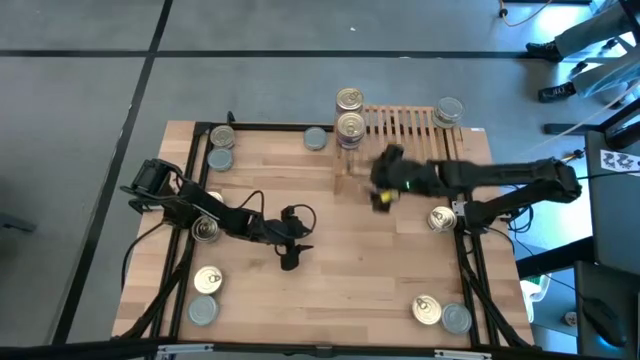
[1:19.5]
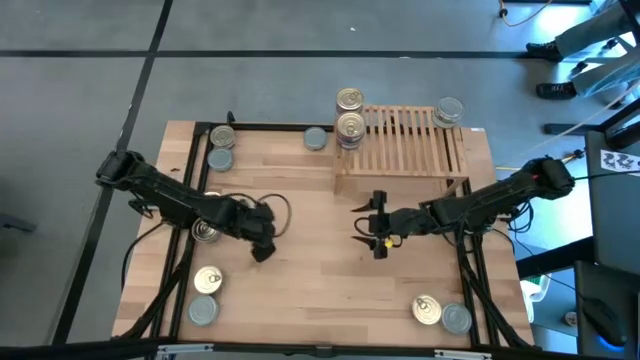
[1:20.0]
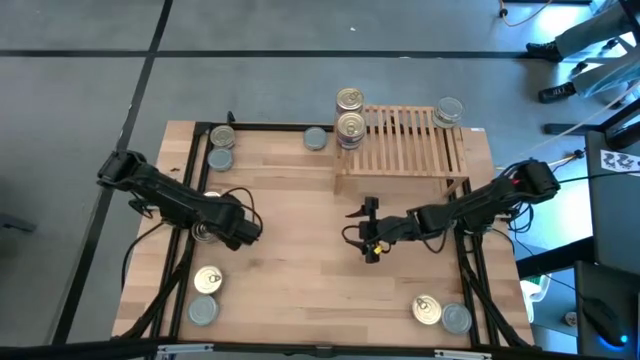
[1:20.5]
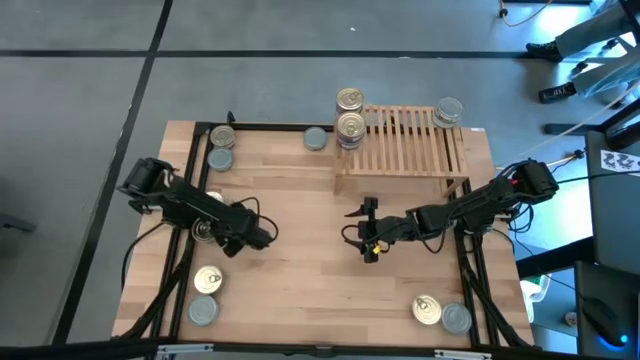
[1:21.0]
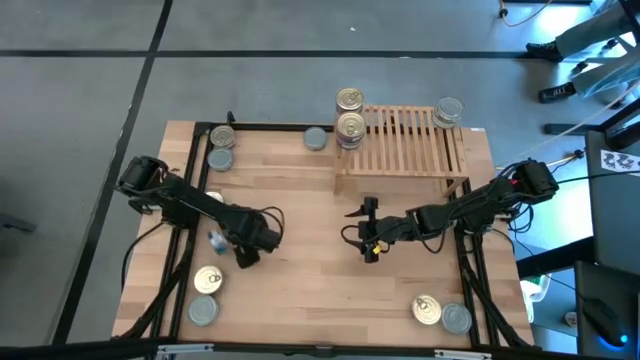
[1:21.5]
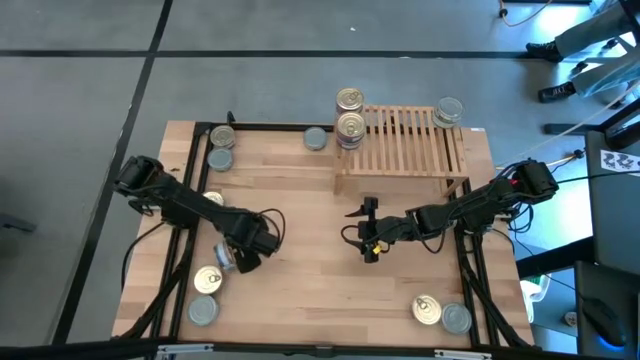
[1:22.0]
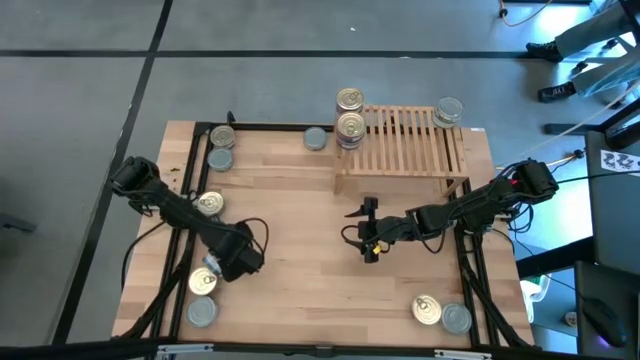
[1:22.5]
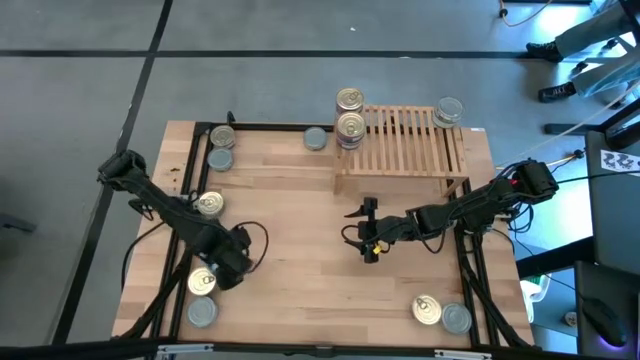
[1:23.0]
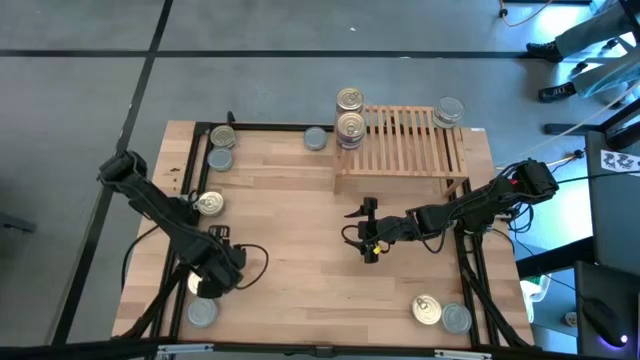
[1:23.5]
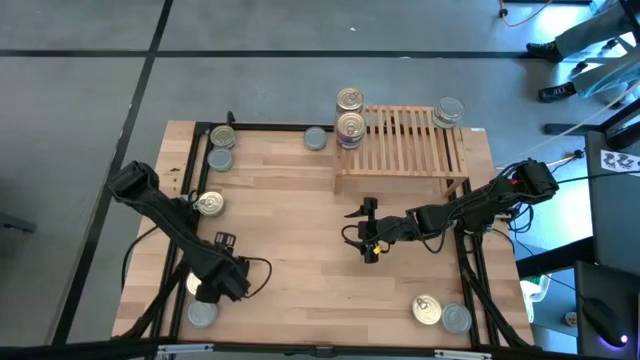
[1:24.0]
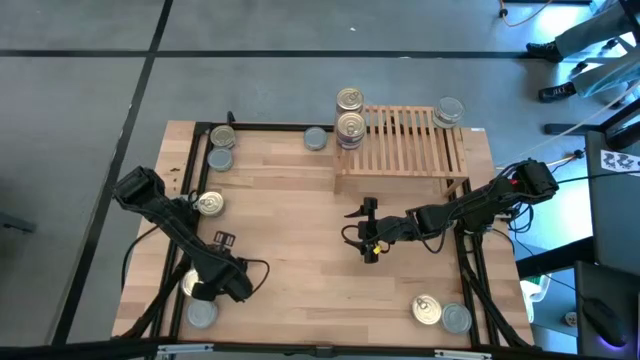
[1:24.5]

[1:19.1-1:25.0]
Task: Stack canned seafood by type on shelf
Put the blue-pink tuna can on the shelf aligned with the other blue-pink tuna can

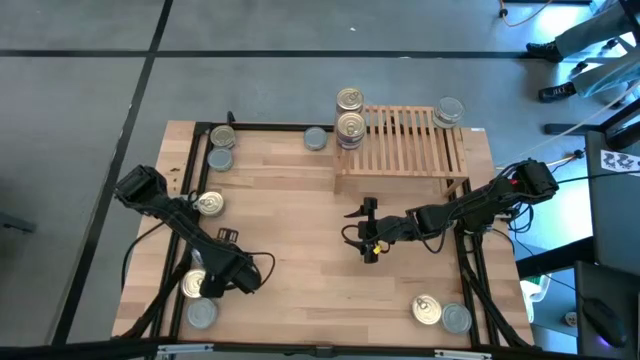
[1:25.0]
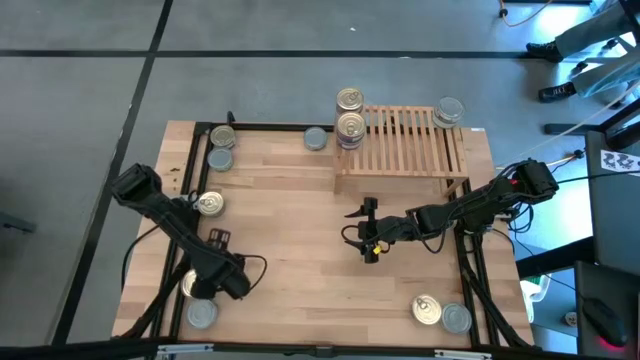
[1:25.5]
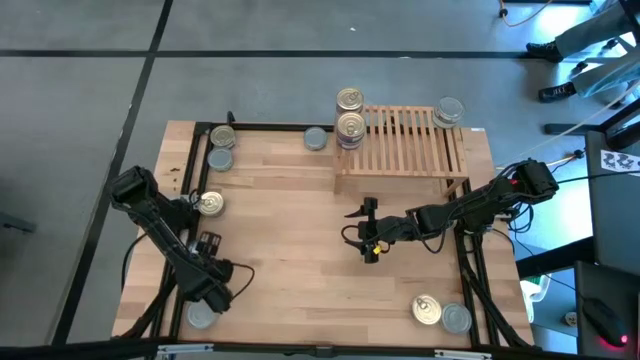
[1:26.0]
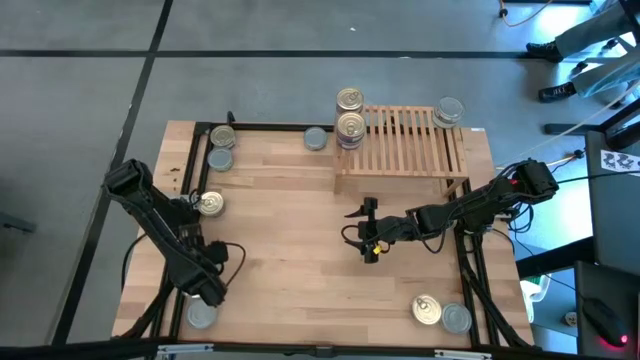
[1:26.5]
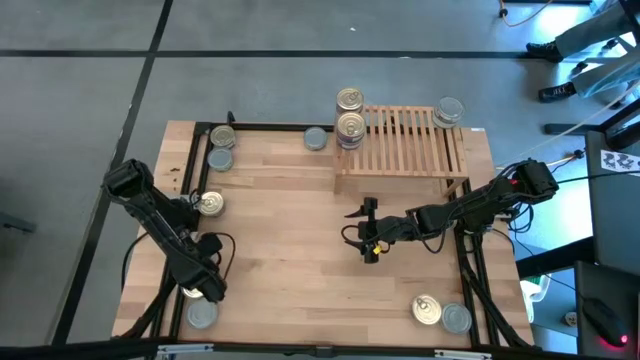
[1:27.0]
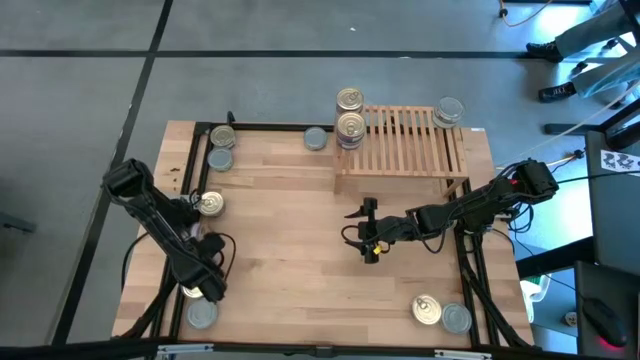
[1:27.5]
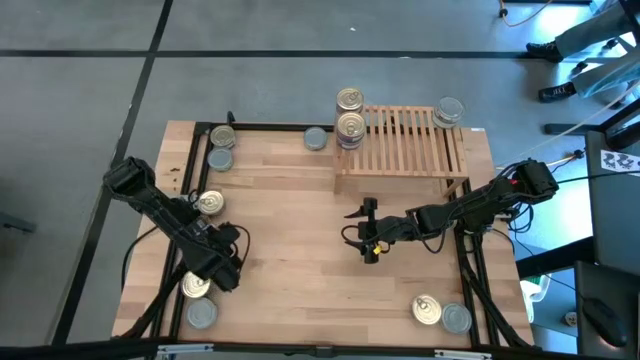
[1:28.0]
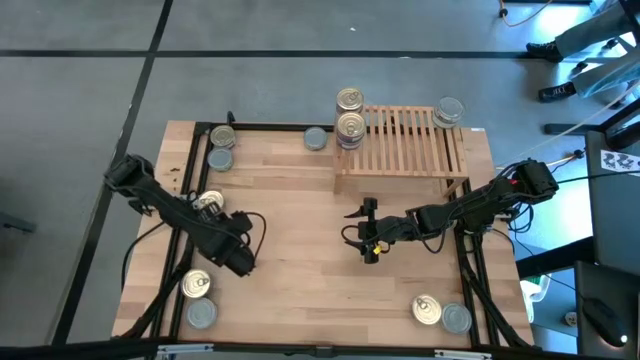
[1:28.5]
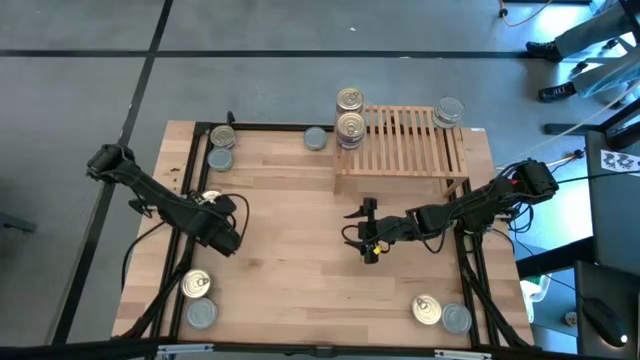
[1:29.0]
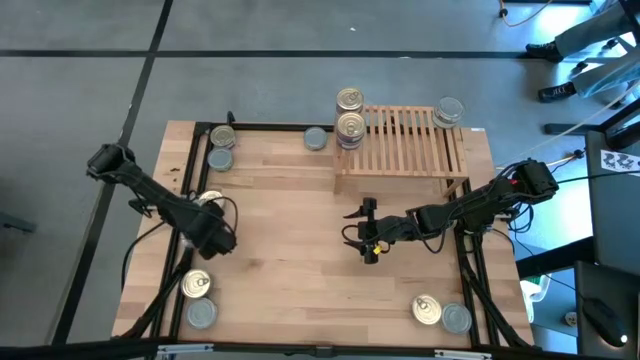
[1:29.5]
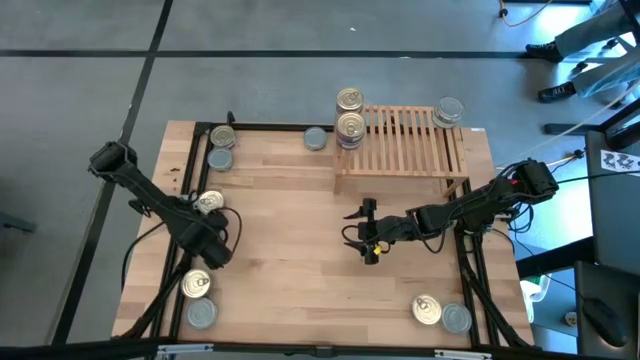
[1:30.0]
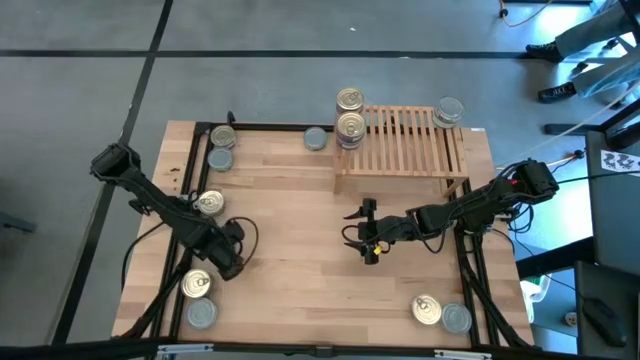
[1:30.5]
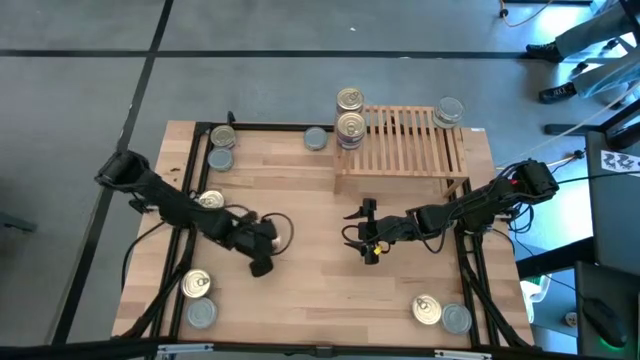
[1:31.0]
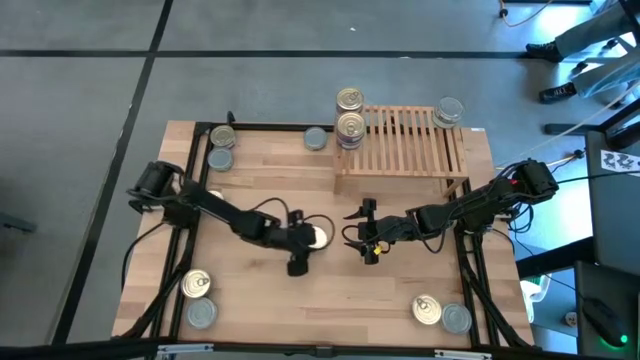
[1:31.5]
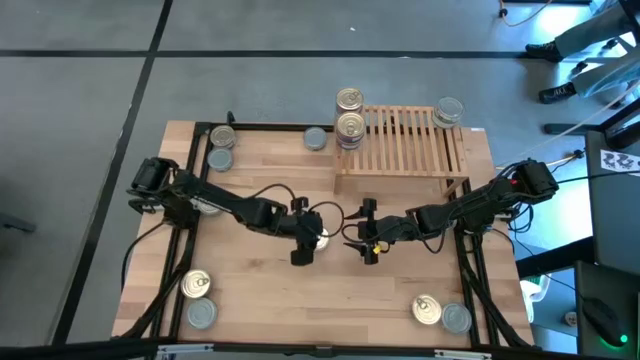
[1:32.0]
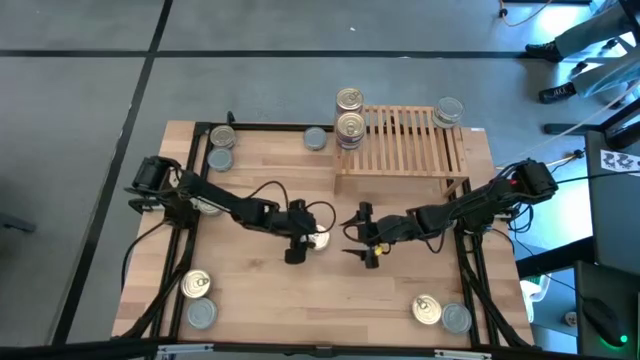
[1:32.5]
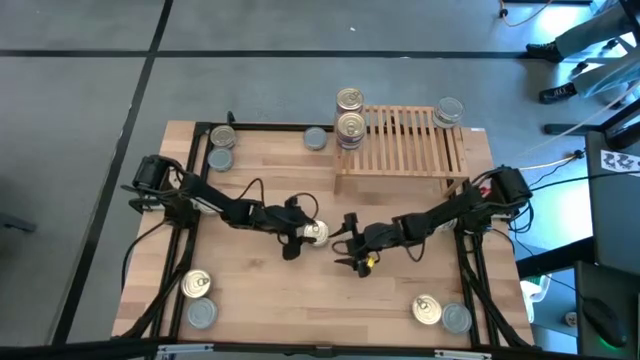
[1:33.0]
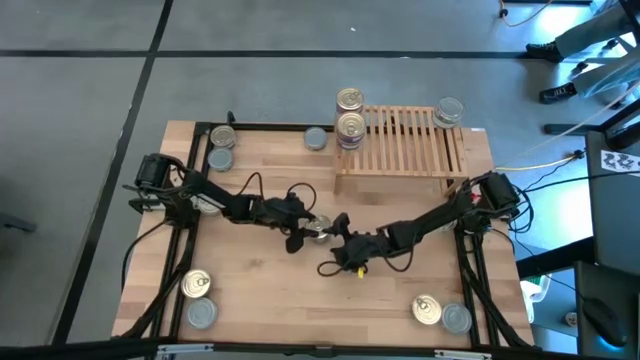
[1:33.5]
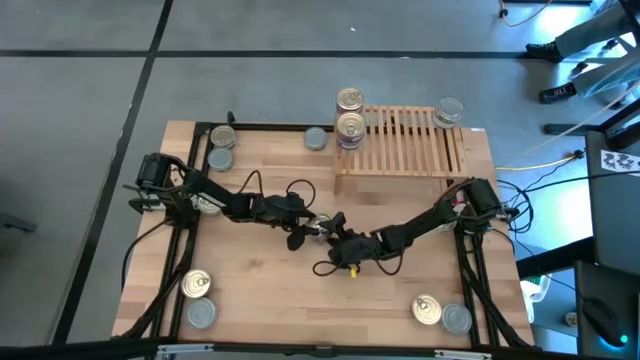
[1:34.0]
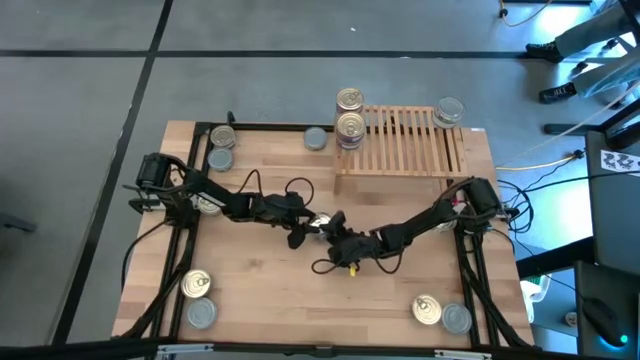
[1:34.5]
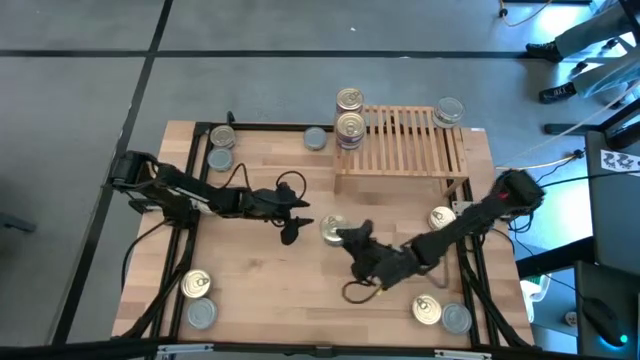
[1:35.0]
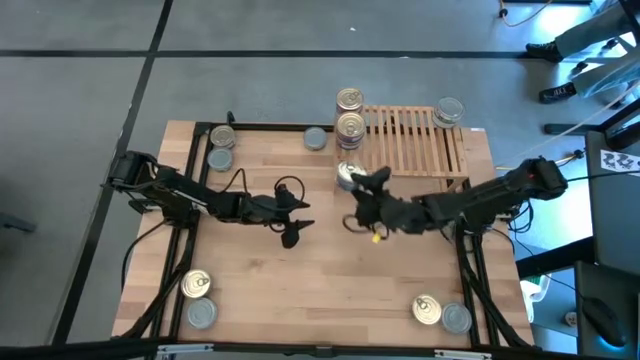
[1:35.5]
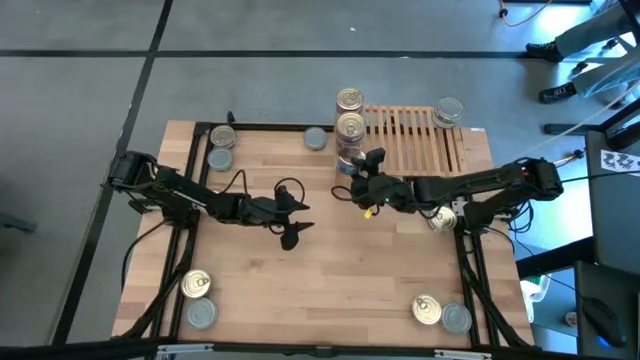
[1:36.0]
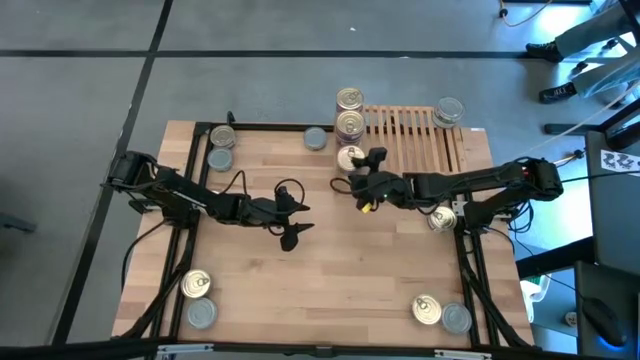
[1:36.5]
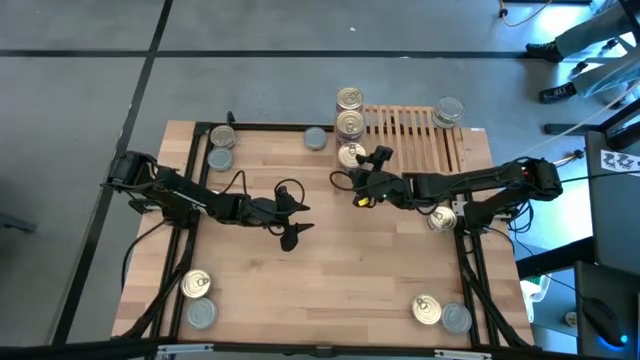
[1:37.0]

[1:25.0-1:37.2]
Put the blue-pink tuna can on the shelf aligned with the other blue-pink tuna can

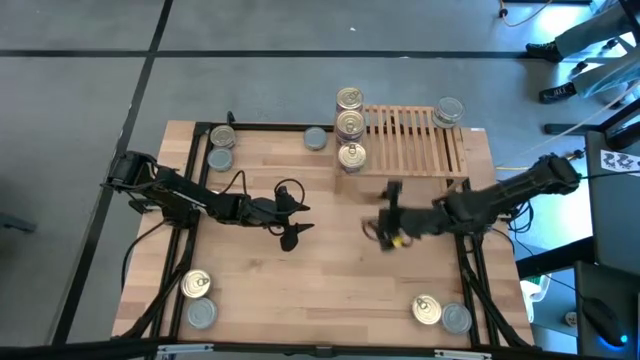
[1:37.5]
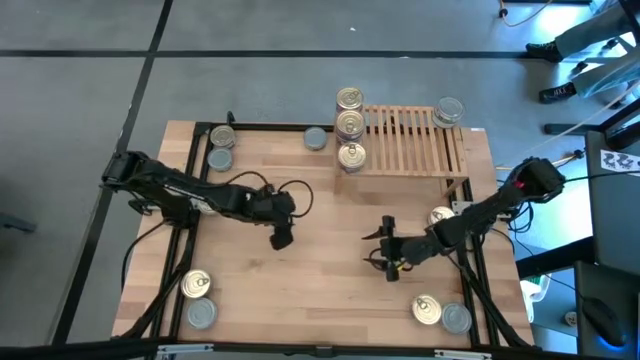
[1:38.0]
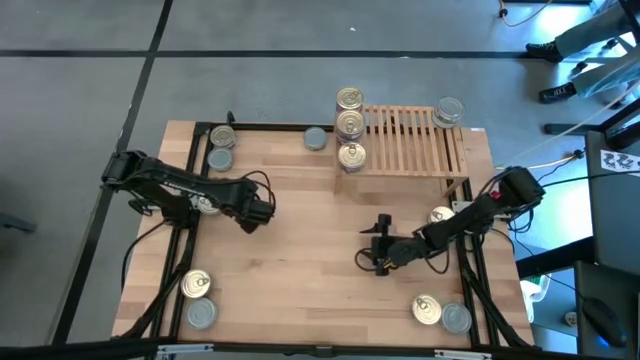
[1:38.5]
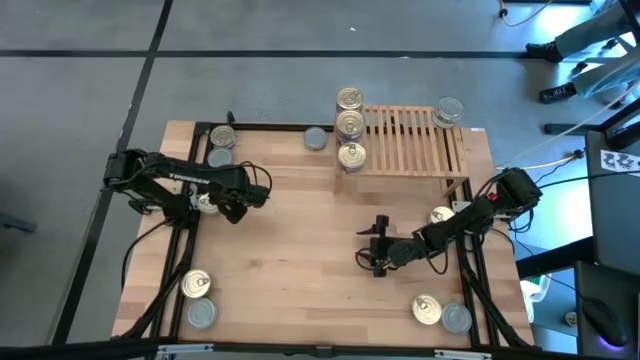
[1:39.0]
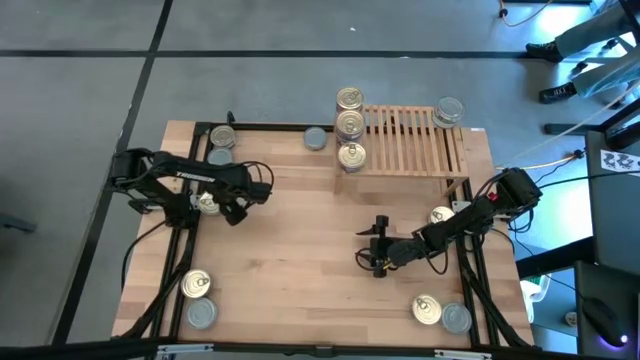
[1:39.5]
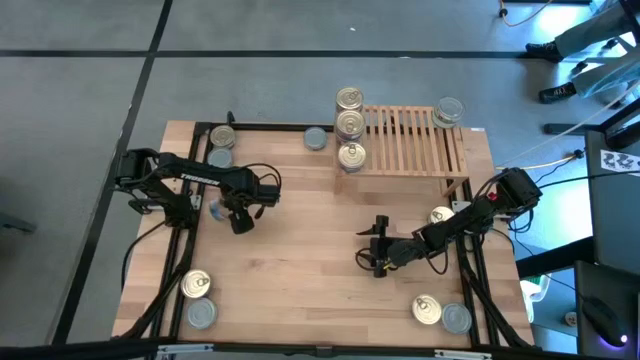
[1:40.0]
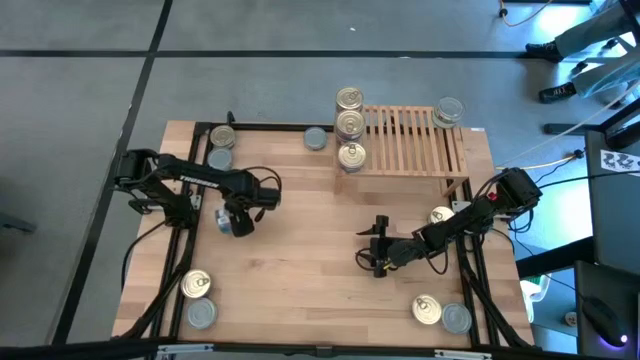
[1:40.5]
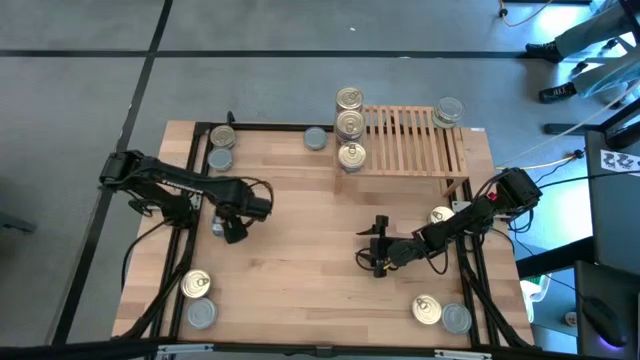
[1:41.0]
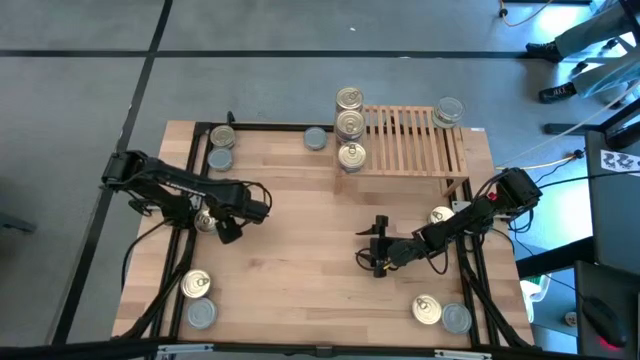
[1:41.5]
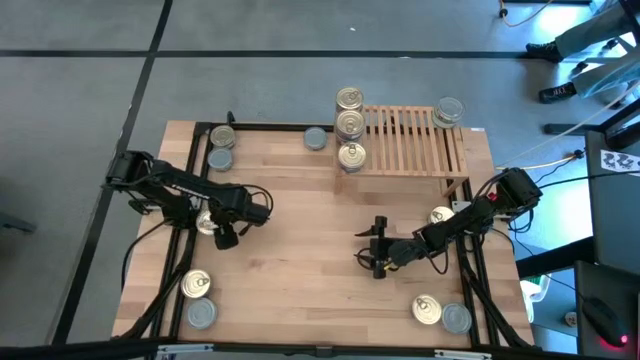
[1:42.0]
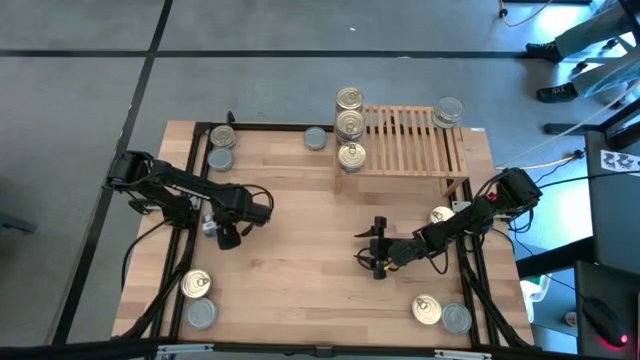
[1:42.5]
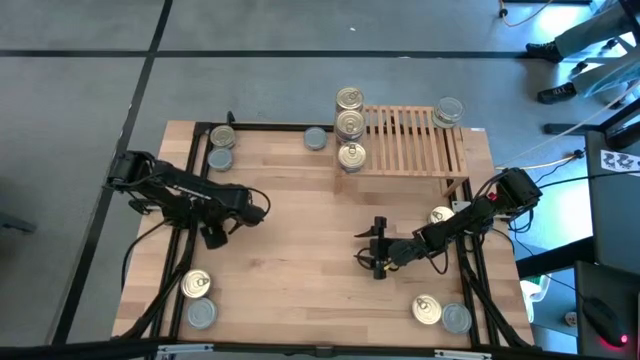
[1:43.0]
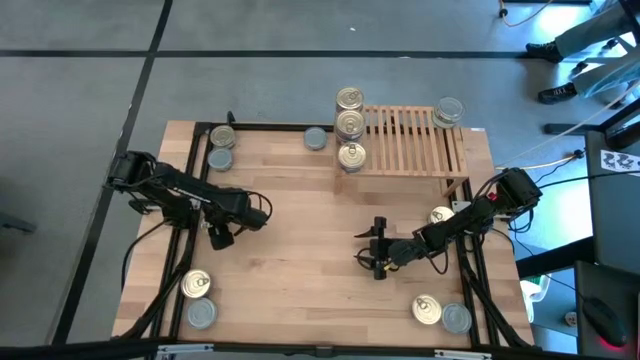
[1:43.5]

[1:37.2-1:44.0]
Stack the blue-pink tuna can on top of the blue-pink tuna can on the shelf
